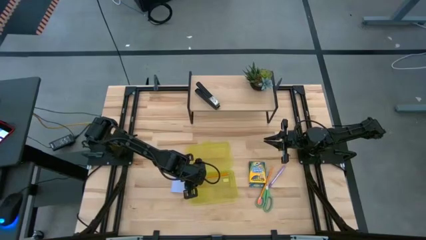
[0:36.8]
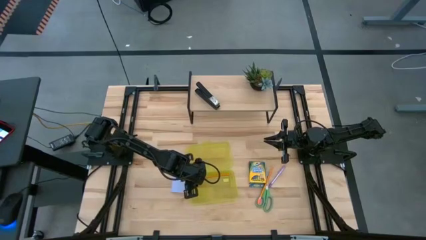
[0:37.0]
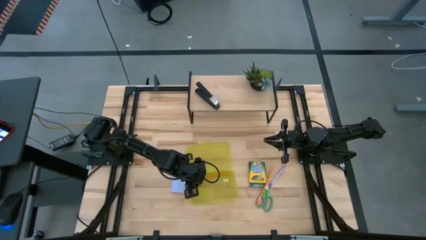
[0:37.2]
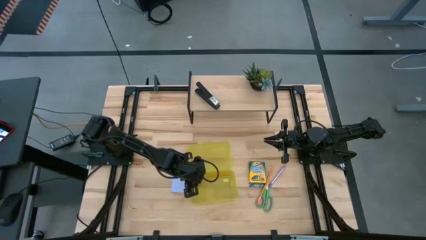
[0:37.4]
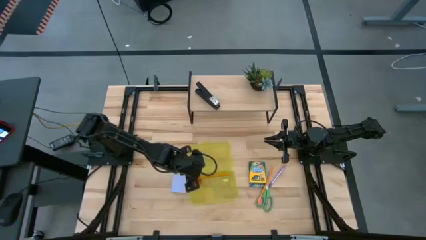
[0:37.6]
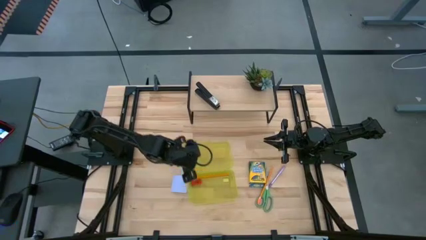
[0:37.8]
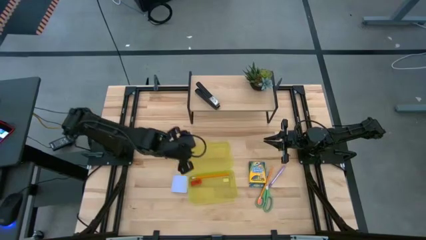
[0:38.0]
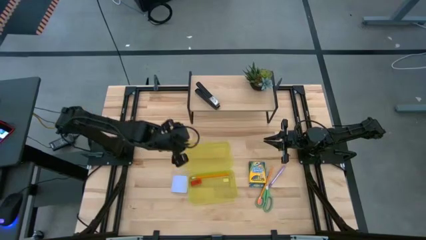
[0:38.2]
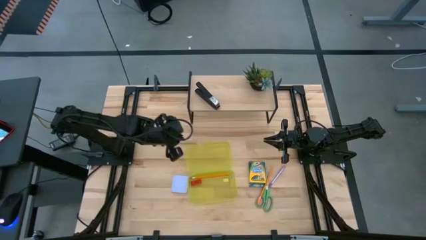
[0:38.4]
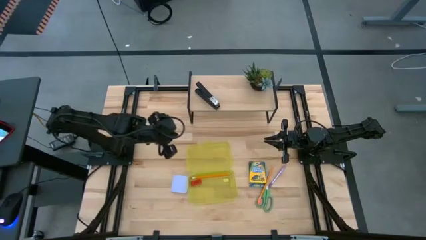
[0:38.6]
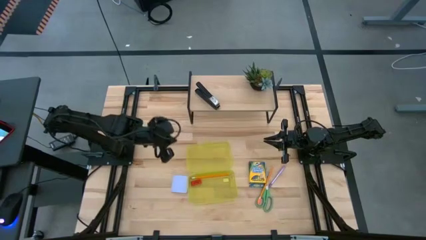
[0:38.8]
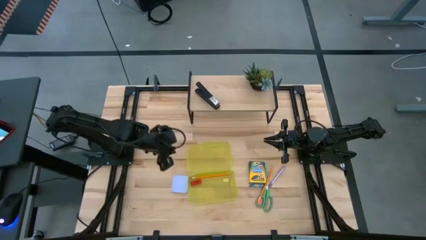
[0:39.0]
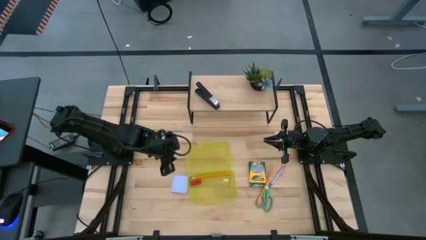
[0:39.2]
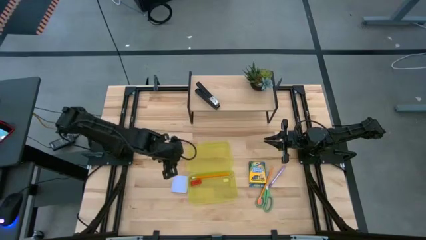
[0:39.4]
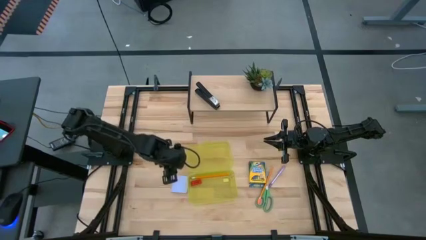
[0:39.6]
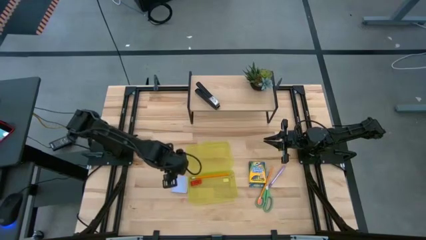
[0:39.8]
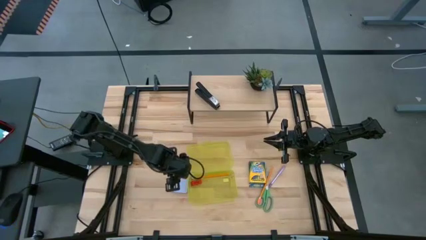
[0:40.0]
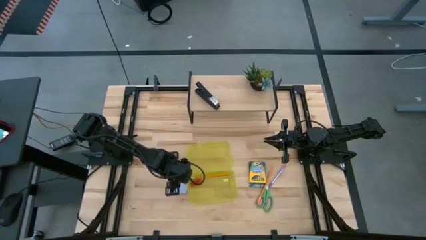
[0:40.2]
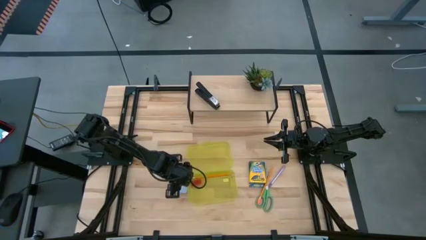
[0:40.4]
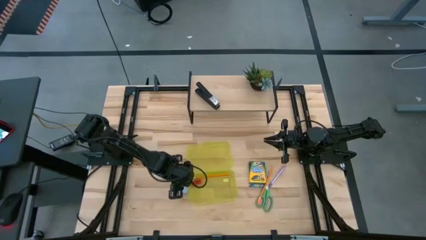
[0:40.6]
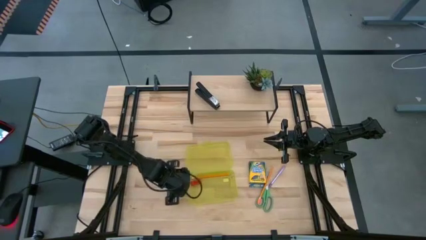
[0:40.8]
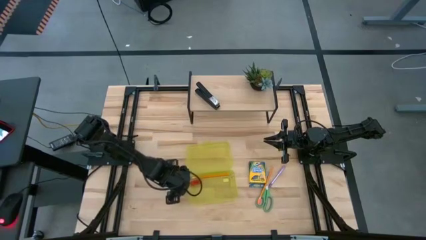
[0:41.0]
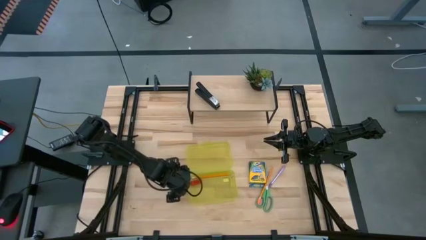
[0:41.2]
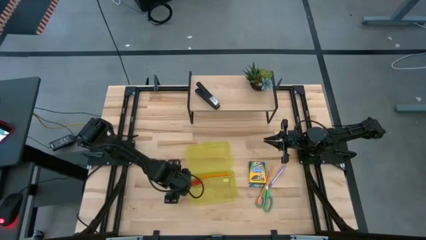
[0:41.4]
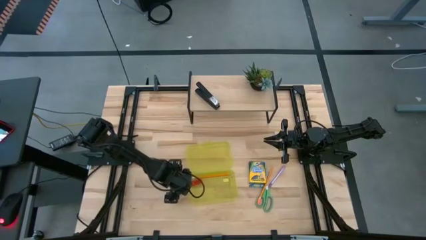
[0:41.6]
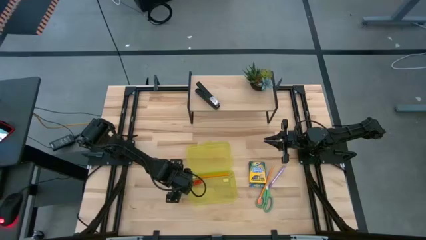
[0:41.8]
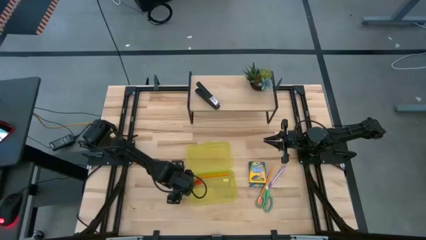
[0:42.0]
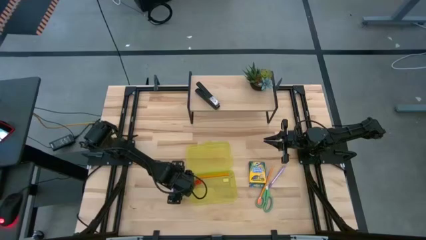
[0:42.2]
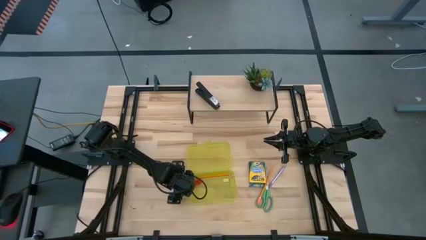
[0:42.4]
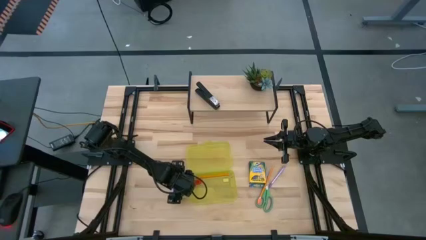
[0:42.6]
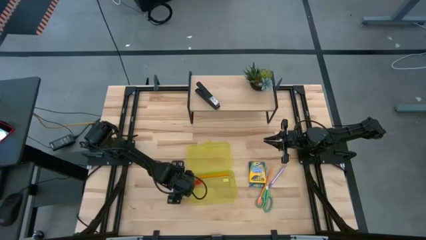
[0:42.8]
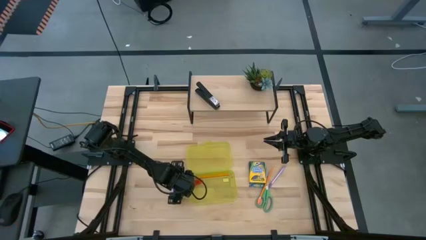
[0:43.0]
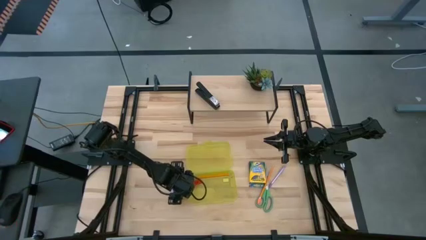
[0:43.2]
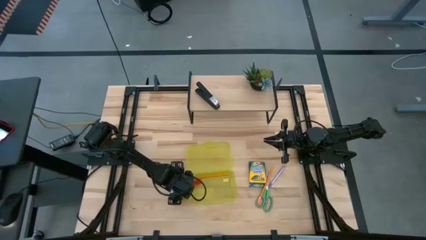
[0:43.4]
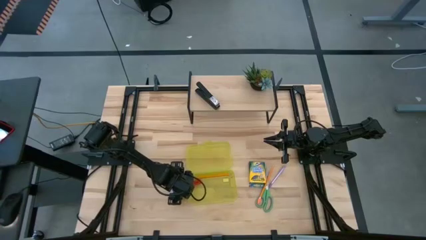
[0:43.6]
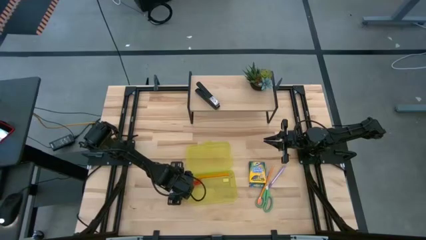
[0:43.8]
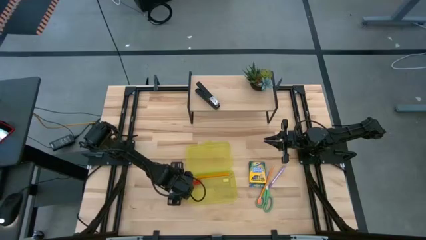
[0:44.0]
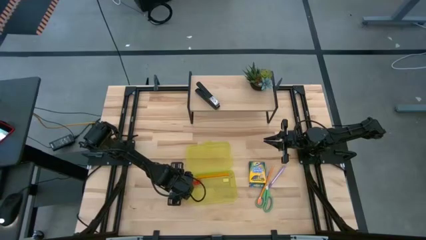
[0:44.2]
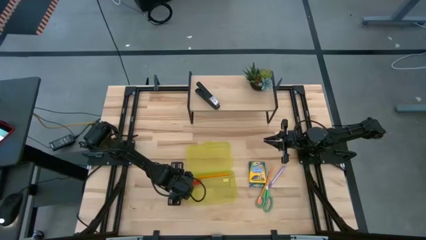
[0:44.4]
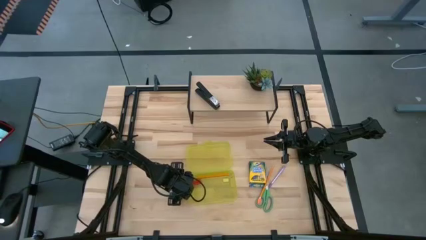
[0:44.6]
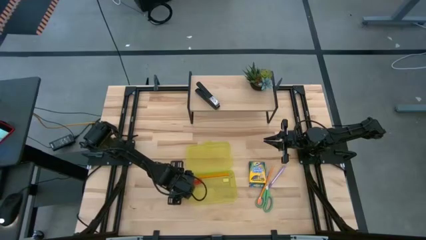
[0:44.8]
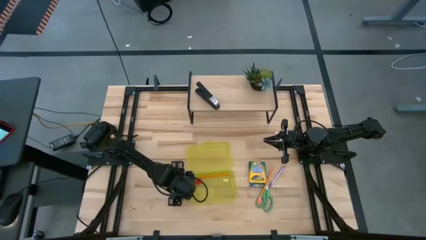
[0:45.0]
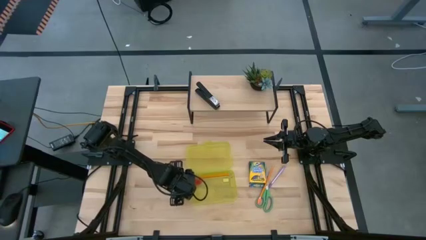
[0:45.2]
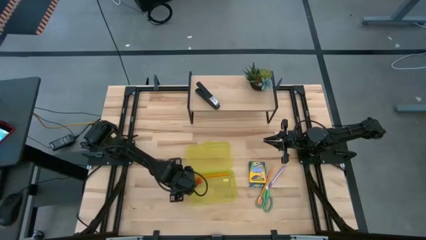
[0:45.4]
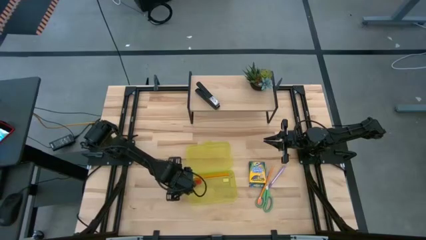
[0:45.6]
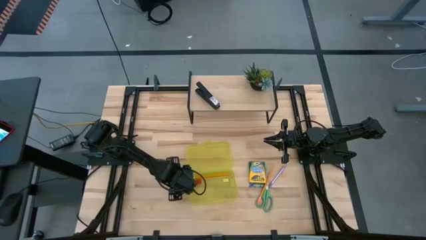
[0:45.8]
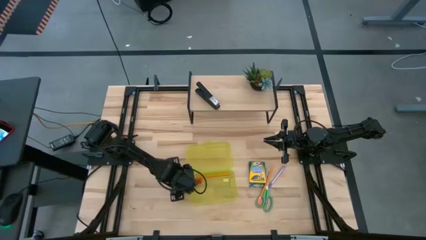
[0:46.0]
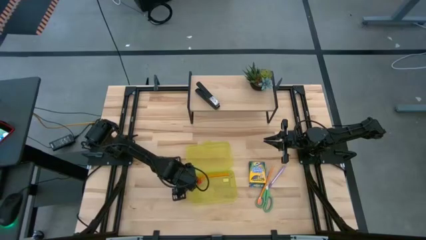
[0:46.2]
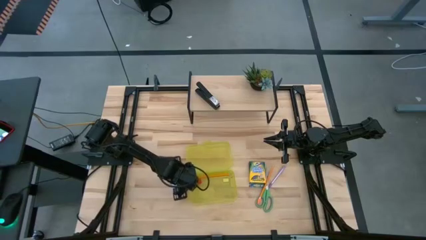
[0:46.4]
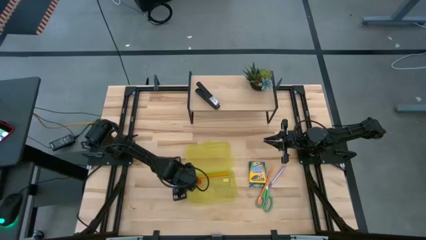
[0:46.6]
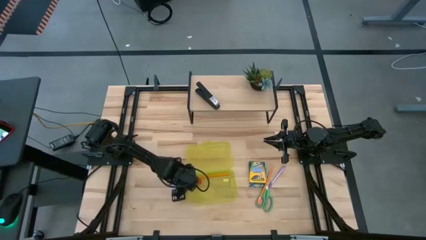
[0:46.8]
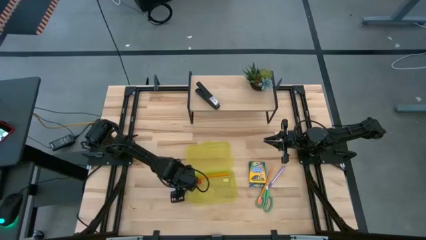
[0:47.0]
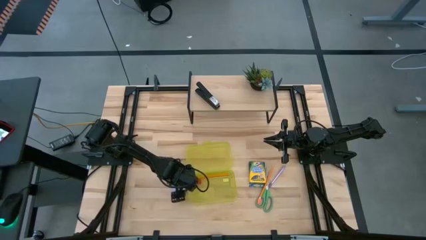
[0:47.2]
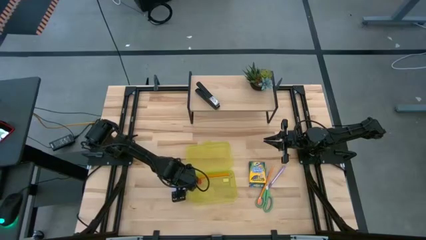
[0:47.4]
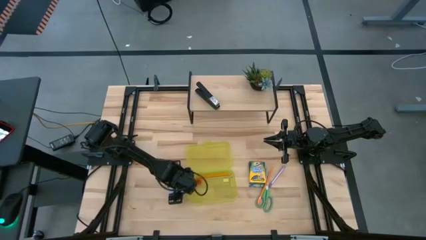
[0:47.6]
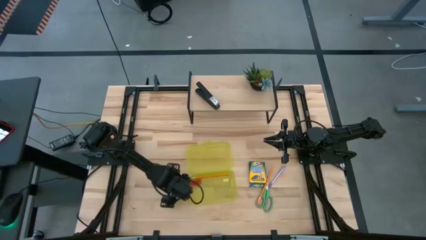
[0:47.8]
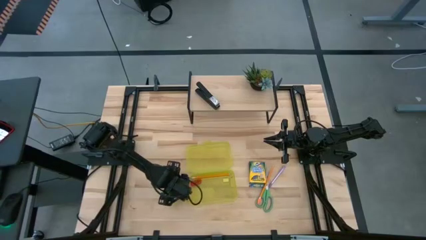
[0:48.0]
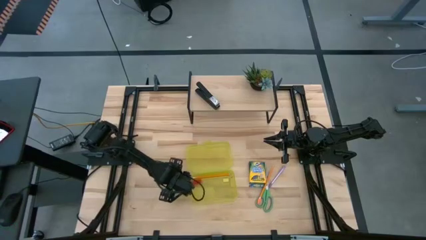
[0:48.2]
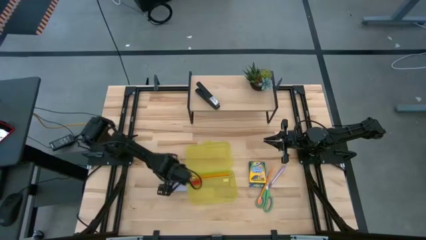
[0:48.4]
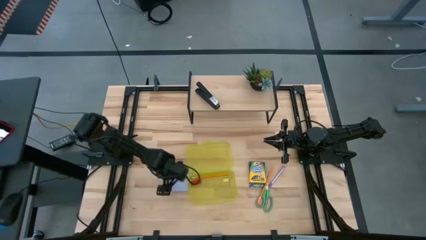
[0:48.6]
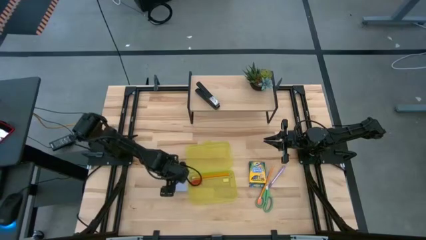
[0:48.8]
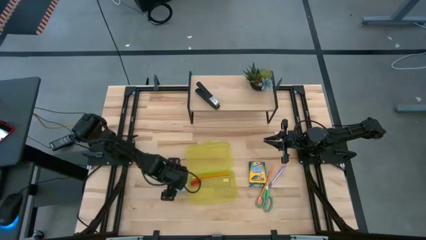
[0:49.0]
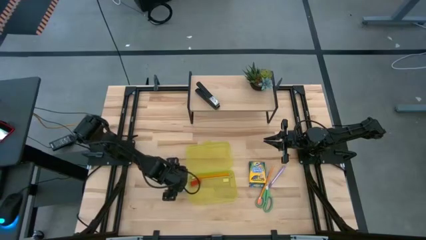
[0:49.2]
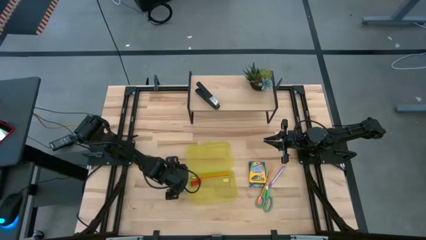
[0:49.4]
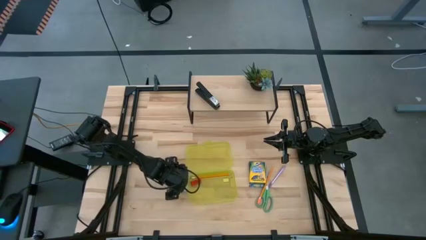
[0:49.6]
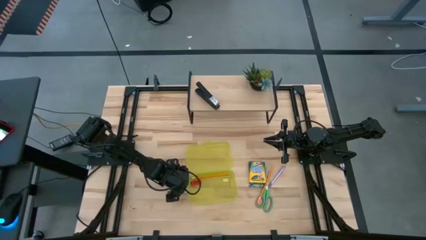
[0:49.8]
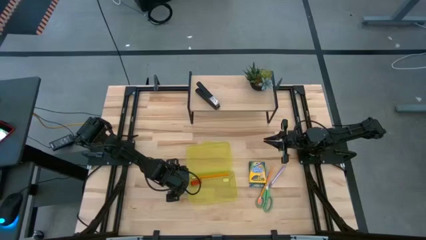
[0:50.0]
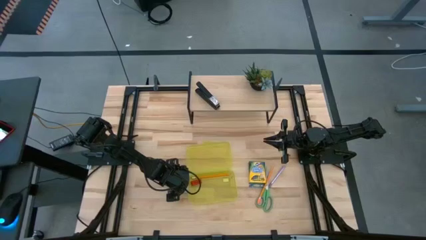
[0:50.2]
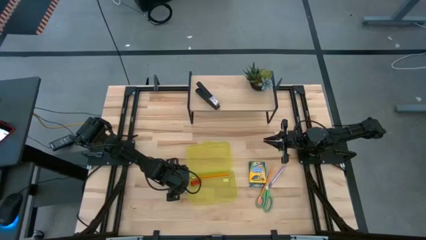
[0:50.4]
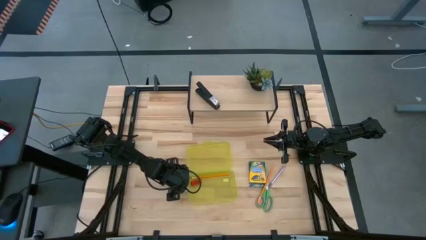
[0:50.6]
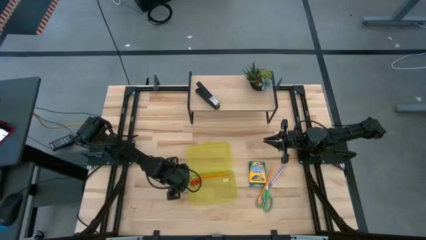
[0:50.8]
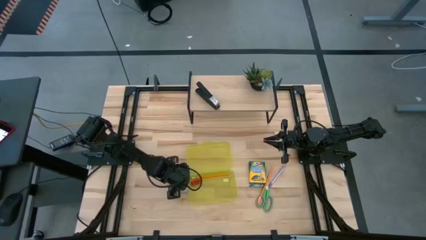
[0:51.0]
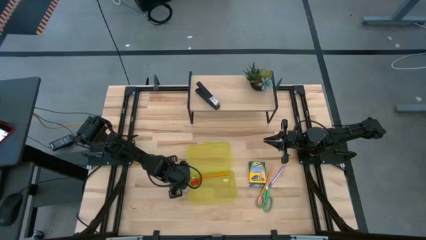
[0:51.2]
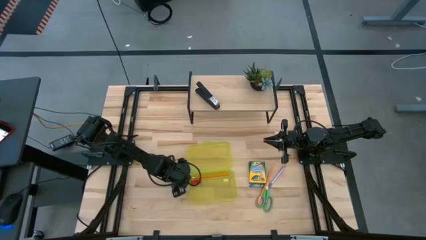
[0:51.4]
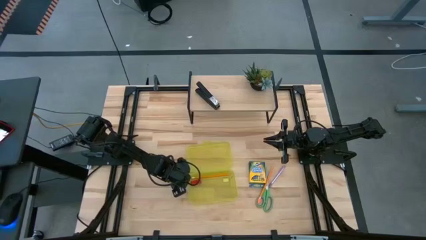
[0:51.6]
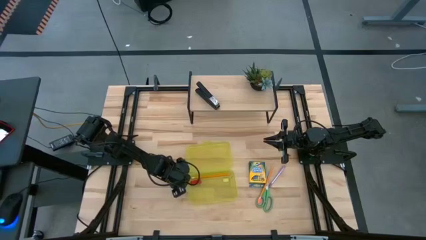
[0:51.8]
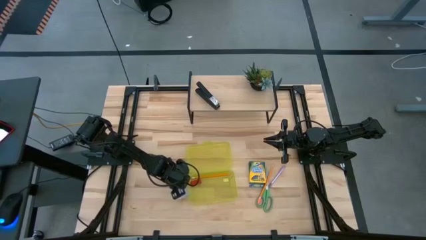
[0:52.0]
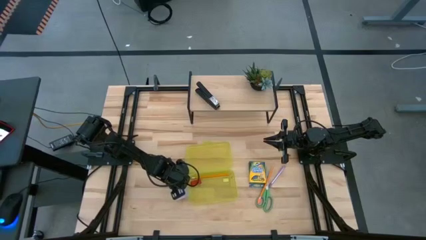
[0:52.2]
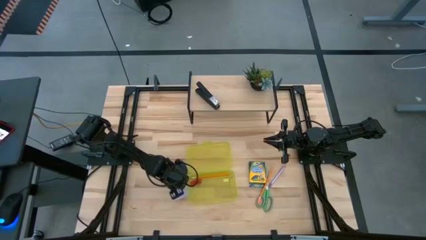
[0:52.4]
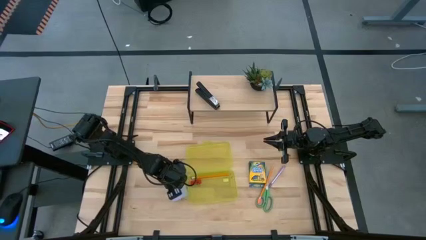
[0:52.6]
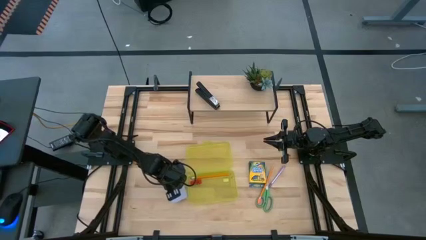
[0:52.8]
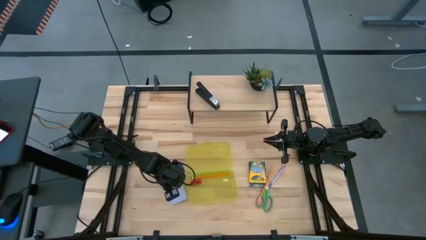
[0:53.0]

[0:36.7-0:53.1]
Task: Pack school essentials
Put the blue sticky note into the yellow supply box
